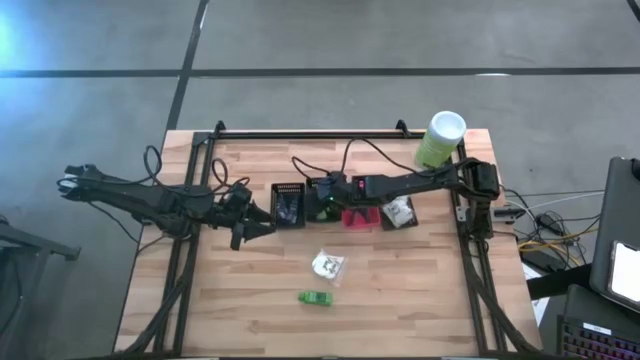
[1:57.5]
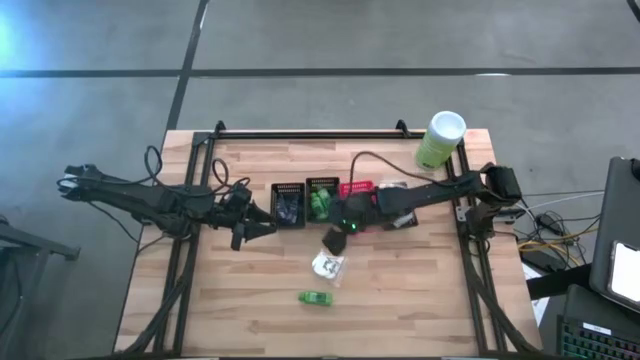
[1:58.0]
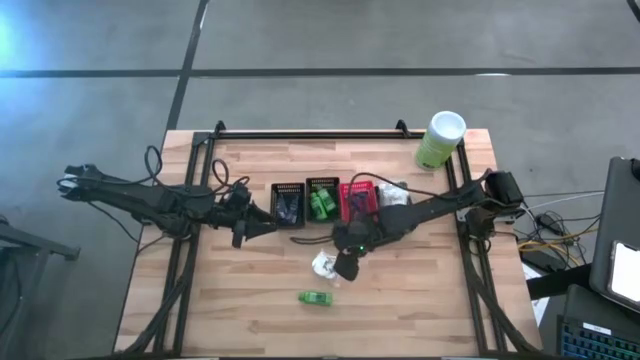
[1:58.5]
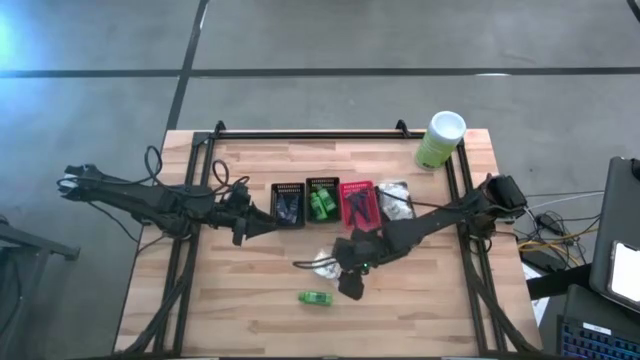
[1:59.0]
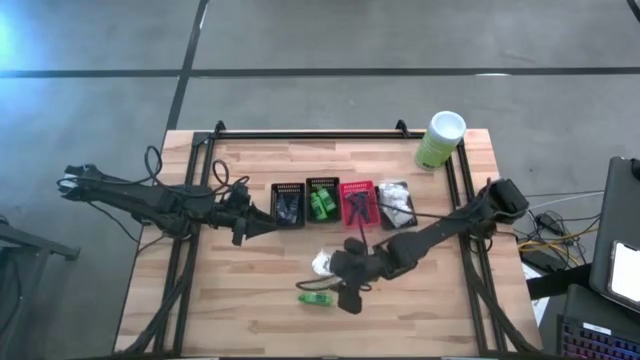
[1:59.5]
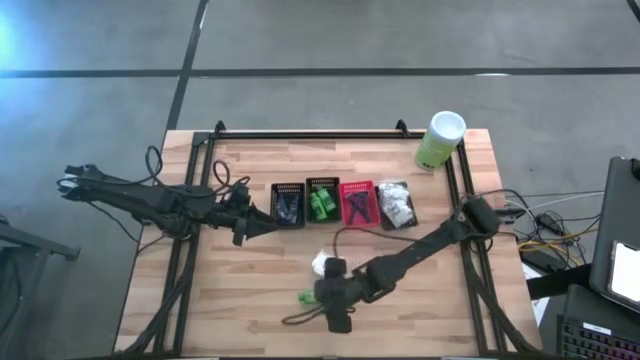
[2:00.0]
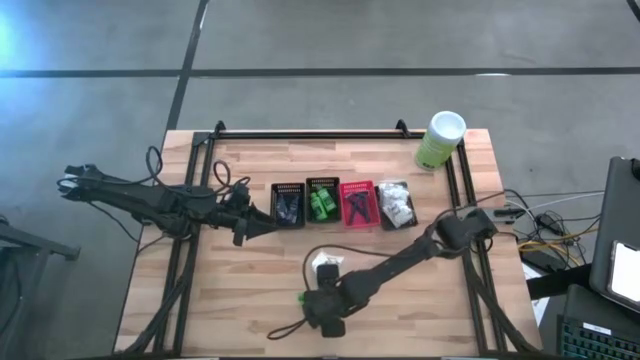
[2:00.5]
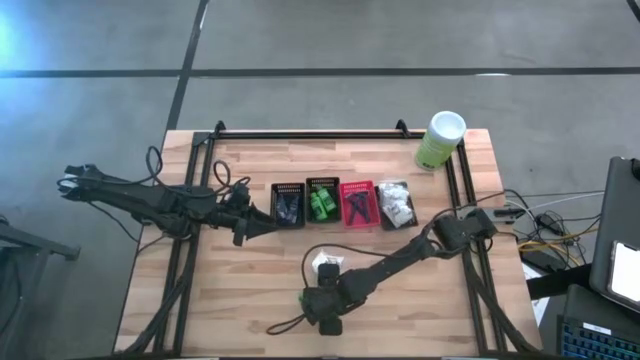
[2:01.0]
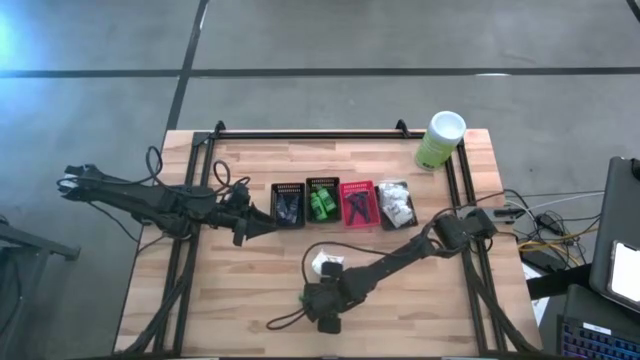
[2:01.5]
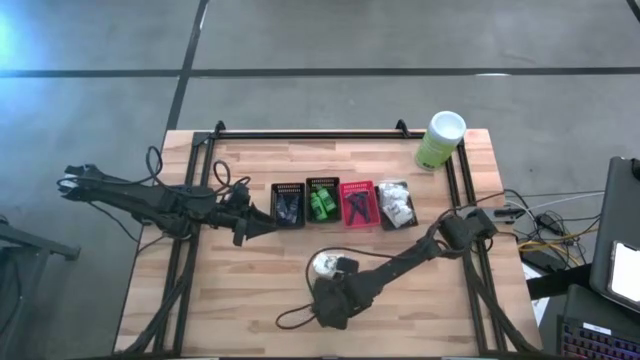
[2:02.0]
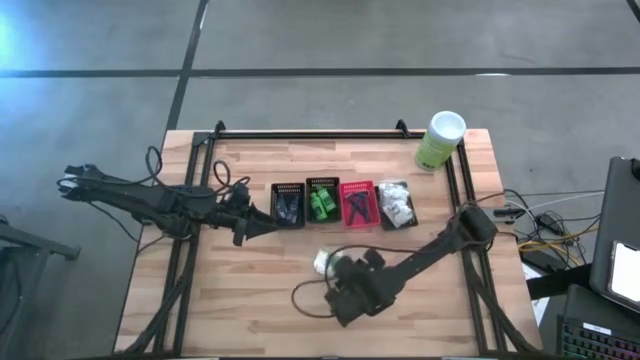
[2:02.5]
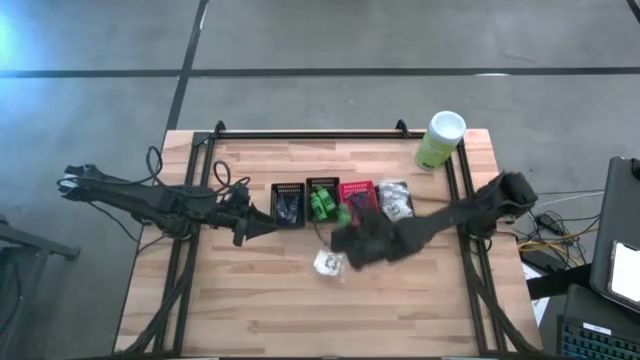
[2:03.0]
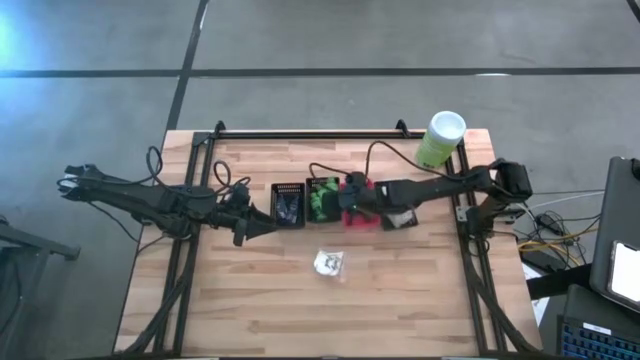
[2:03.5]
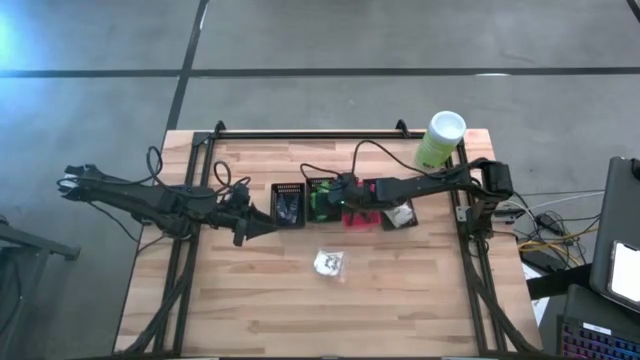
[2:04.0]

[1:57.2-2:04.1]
Task: Pick & Place Travel size toiletries
Put the green shampoo into the middle black basket

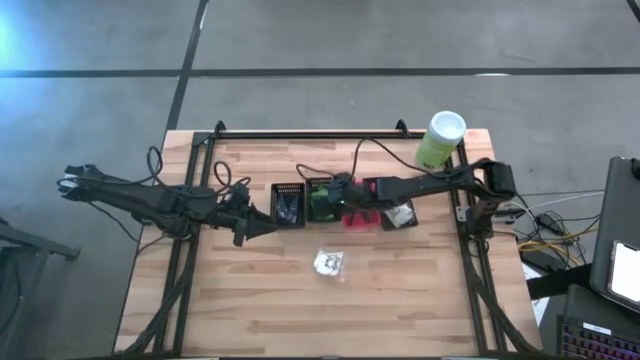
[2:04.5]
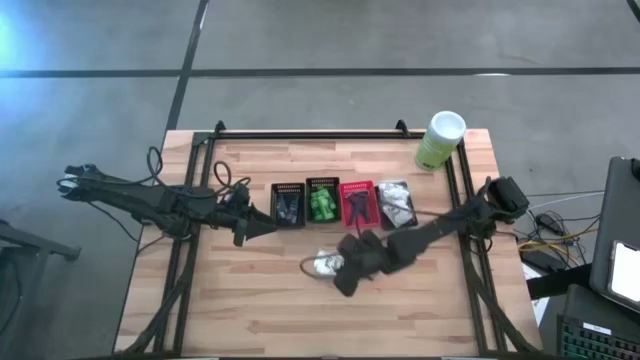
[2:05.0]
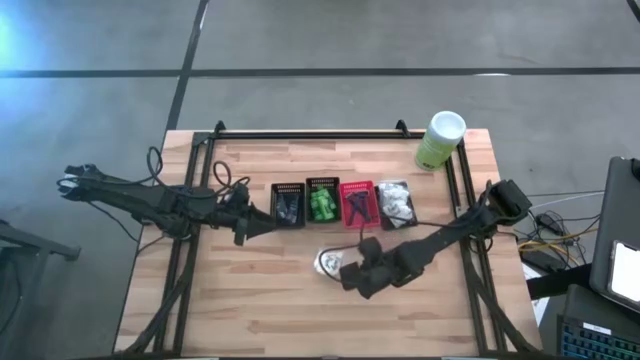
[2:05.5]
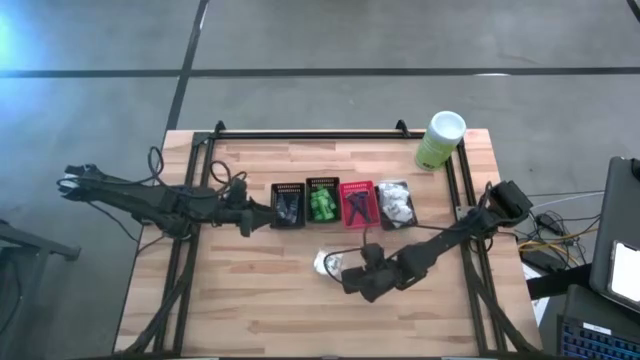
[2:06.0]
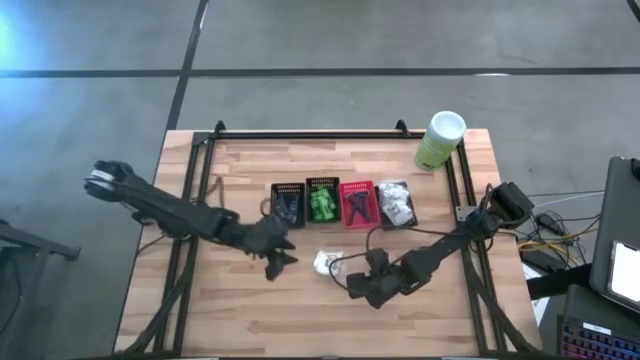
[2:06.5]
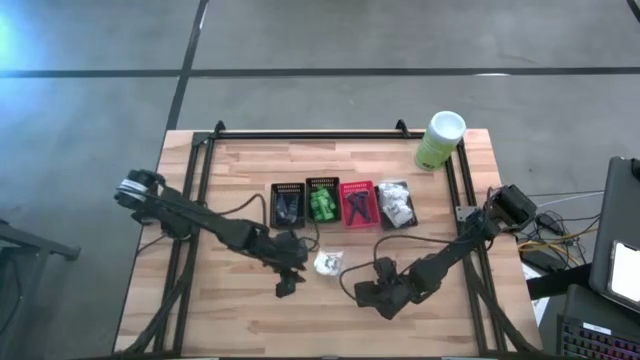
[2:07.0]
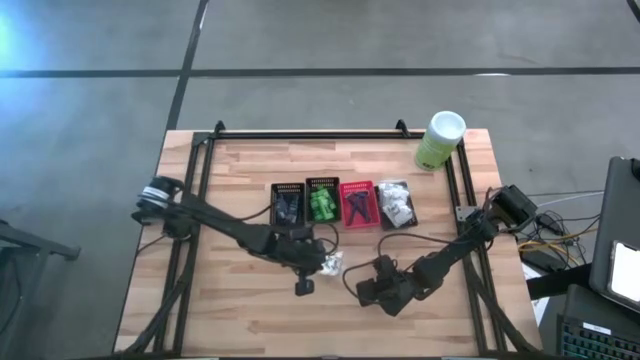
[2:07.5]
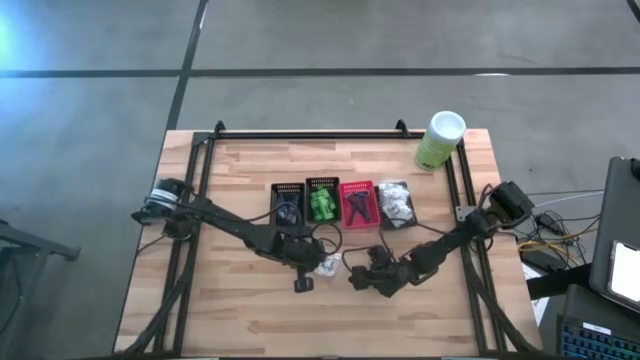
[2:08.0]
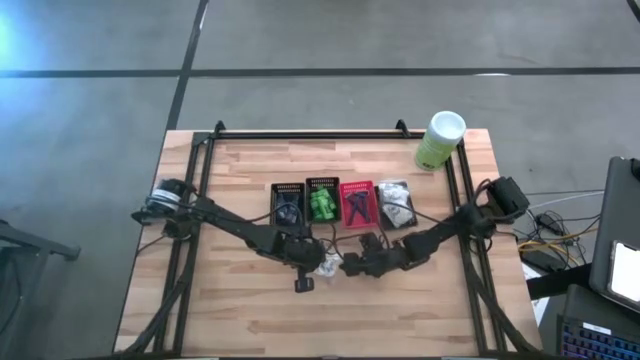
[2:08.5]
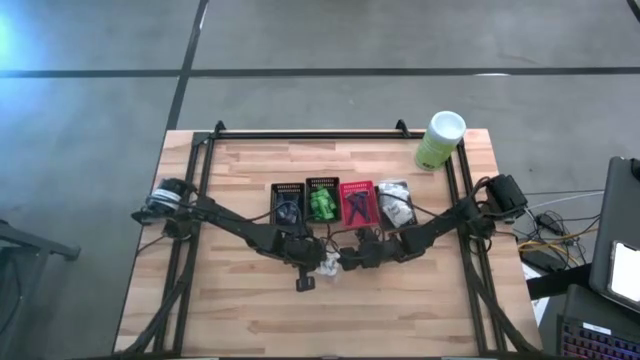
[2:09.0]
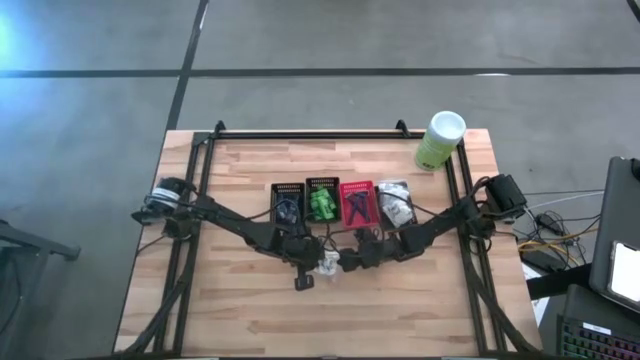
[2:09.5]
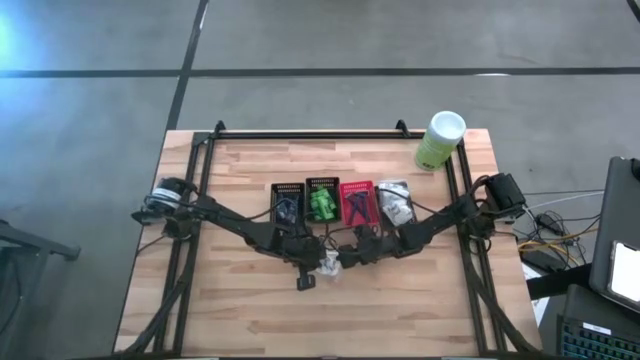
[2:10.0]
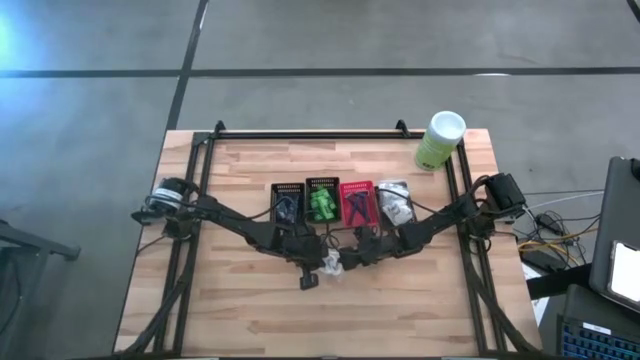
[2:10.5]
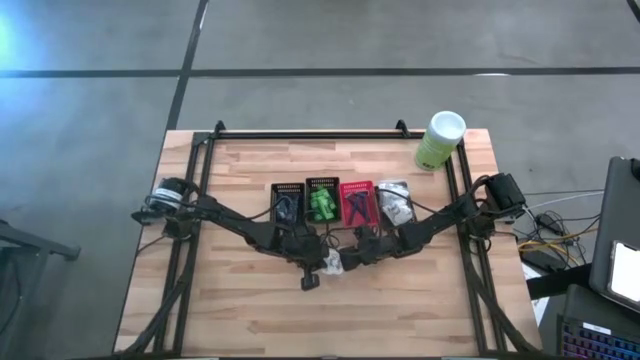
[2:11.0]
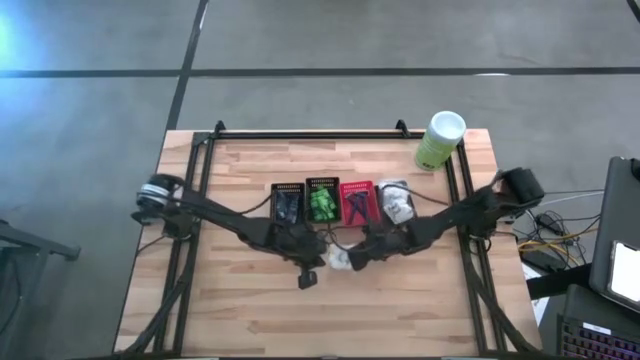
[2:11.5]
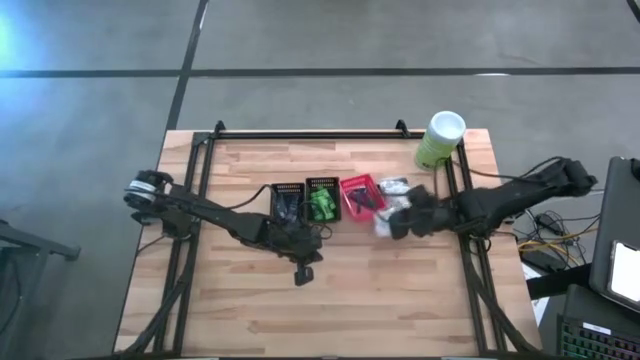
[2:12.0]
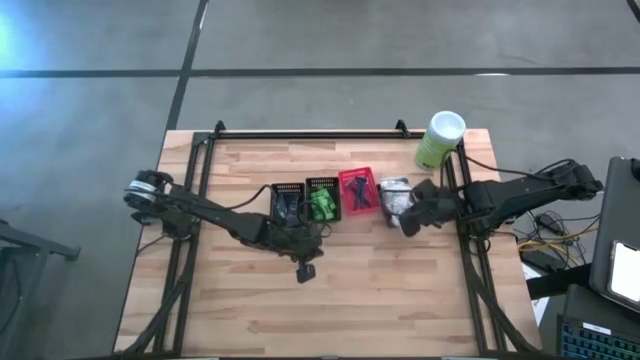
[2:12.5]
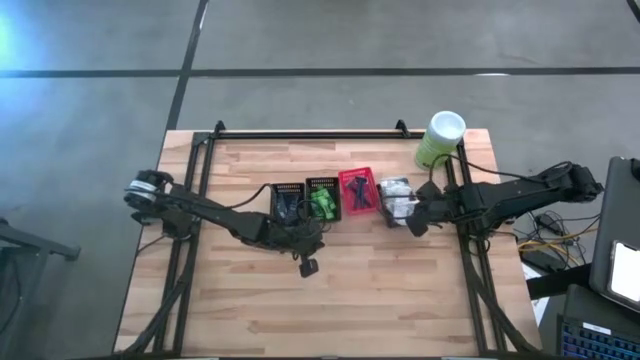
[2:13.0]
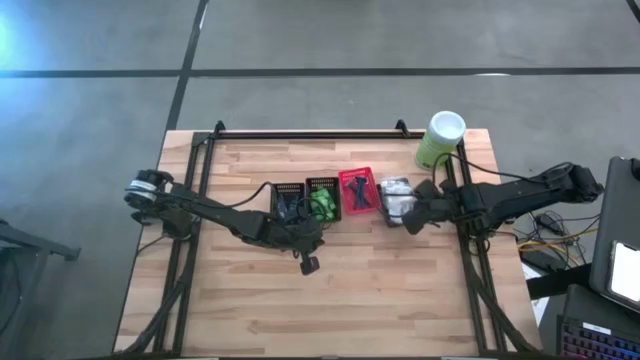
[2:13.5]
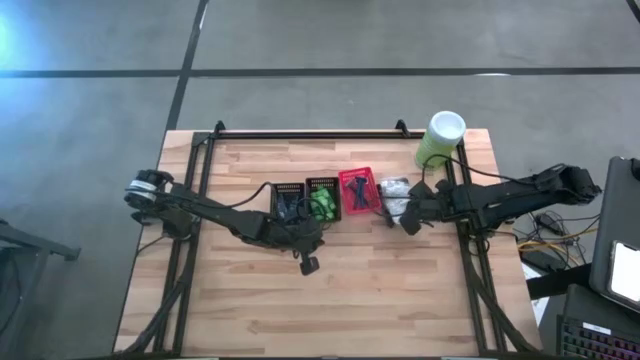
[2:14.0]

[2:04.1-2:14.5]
Put the white cotton pack into the right black basket

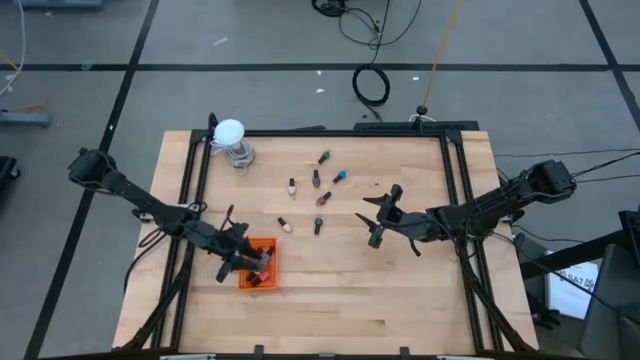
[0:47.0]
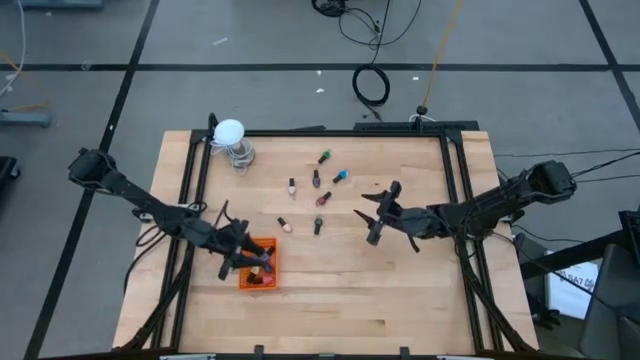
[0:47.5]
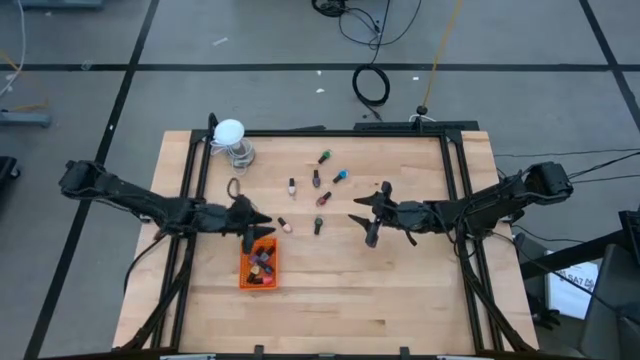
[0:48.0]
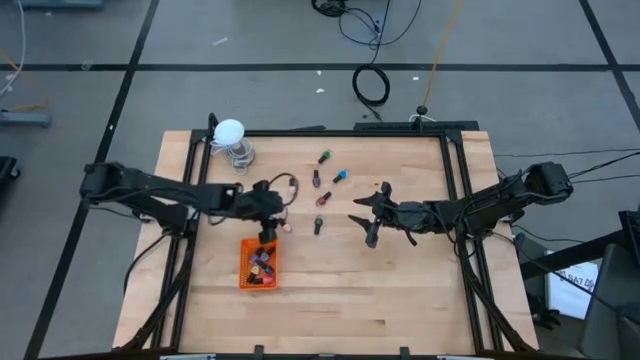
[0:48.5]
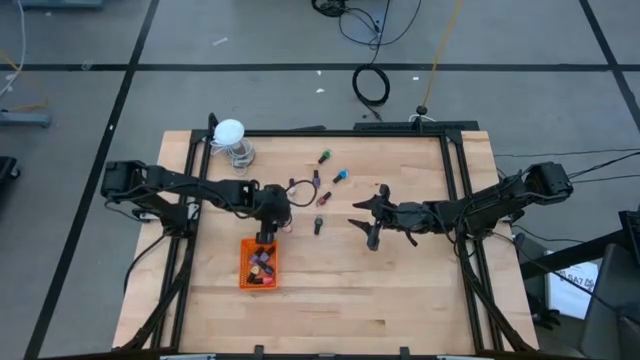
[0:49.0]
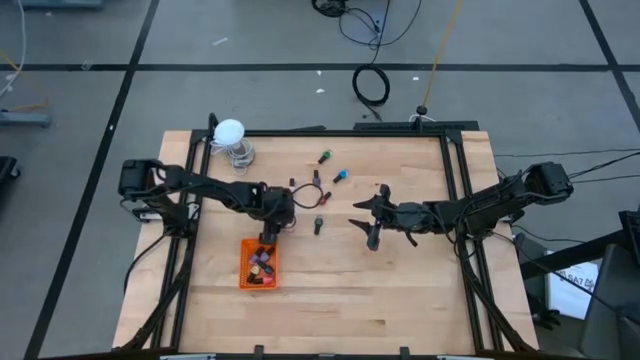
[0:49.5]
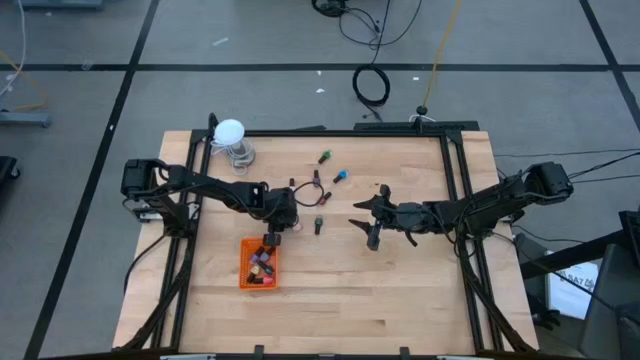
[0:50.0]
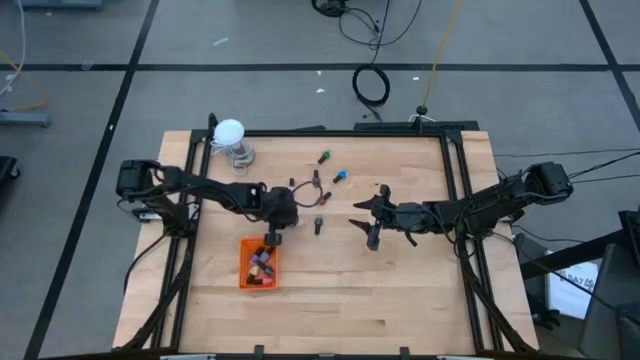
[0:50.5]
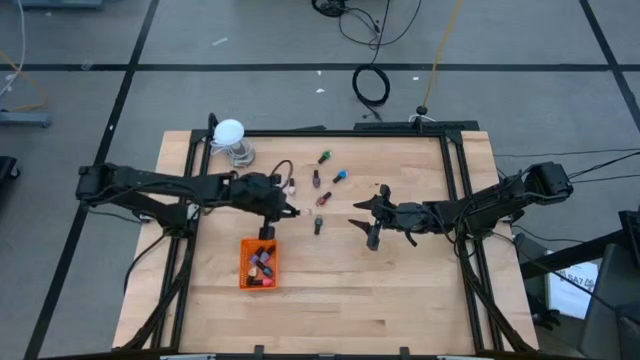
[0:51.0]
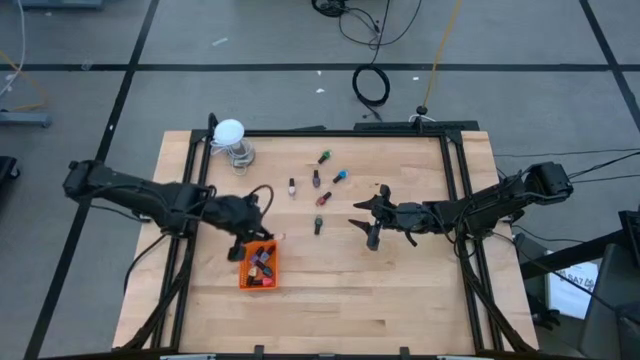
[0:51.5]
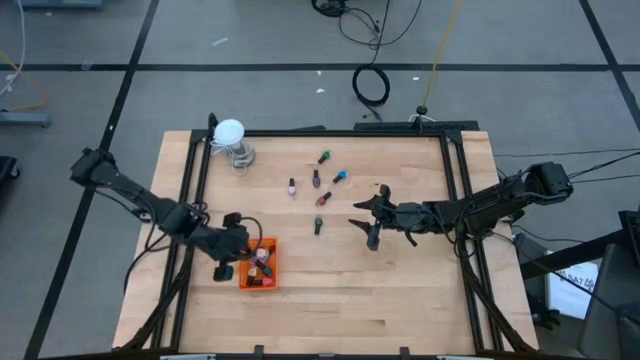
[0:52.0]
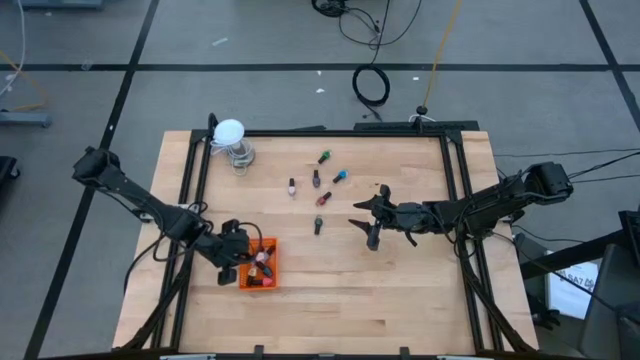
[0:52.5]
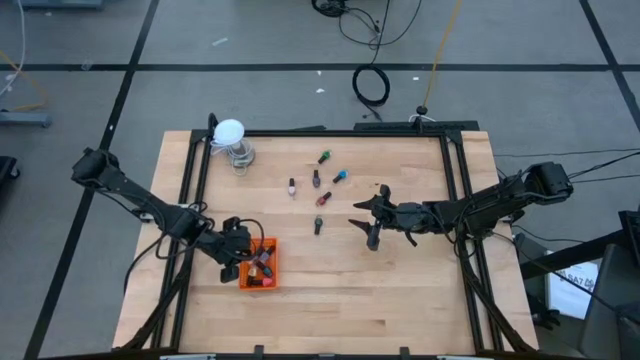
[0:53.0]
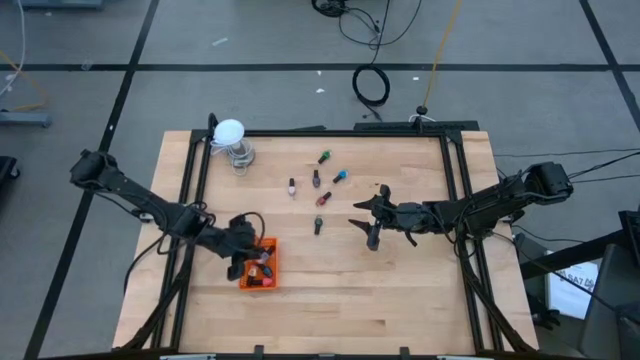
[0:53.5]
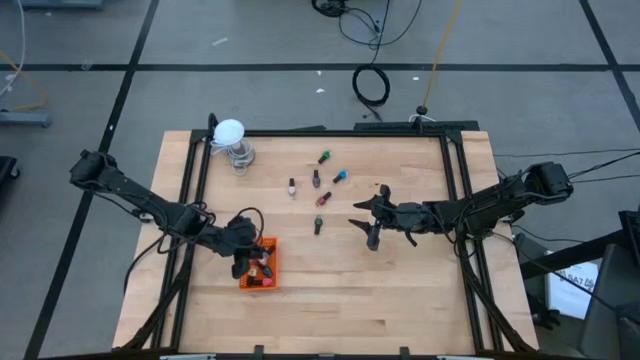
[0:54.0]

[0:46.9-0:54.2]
Task: Pick & Place Nail Polish
Put the pink nail color bottle into the orange bin
